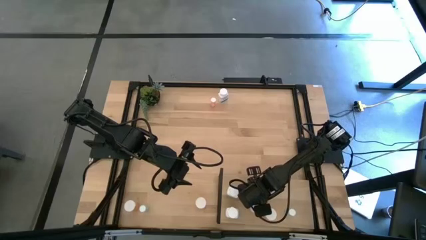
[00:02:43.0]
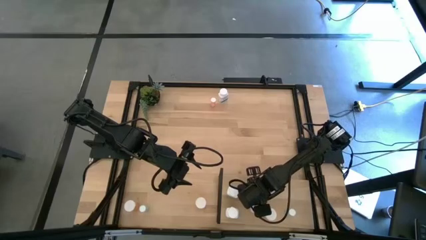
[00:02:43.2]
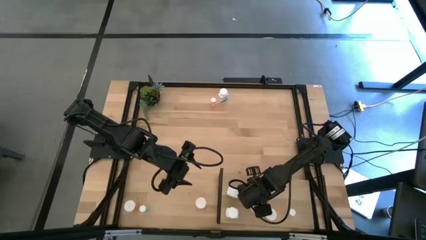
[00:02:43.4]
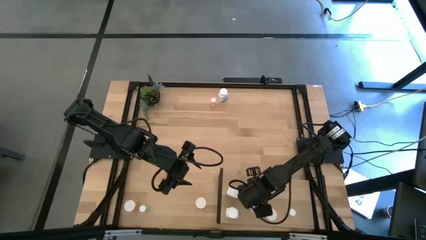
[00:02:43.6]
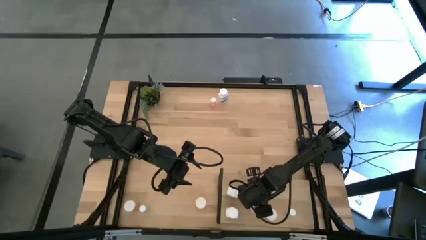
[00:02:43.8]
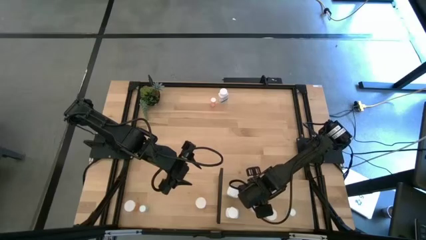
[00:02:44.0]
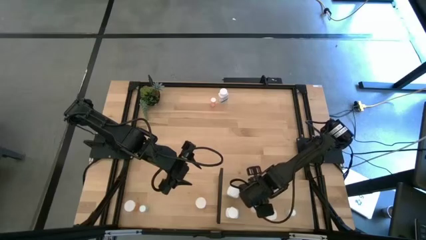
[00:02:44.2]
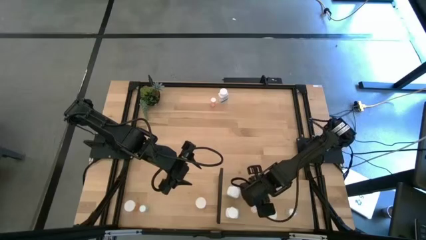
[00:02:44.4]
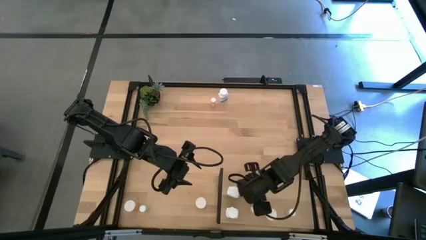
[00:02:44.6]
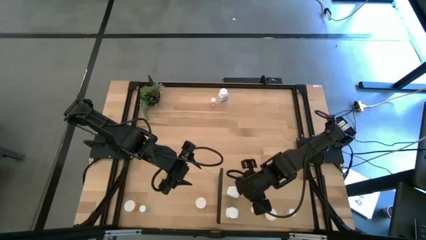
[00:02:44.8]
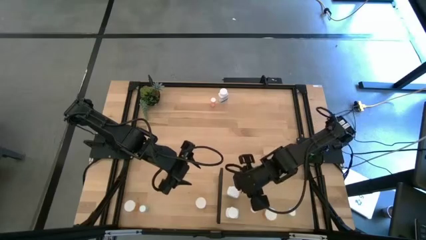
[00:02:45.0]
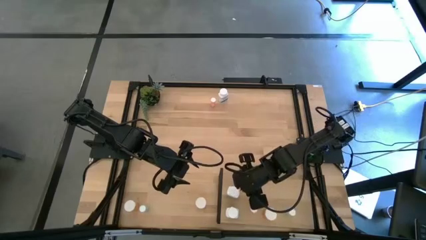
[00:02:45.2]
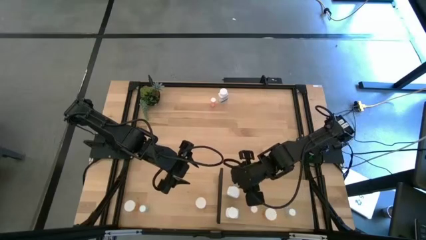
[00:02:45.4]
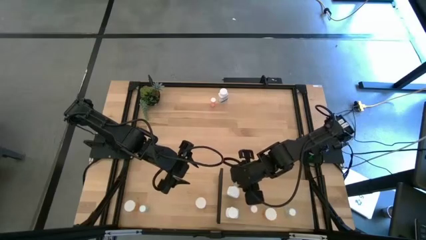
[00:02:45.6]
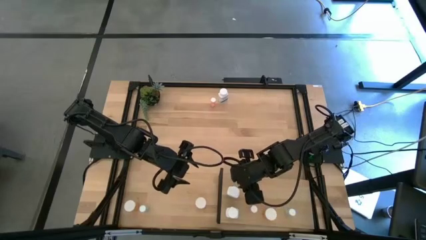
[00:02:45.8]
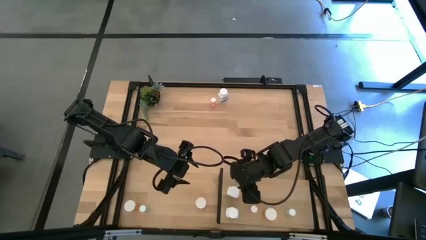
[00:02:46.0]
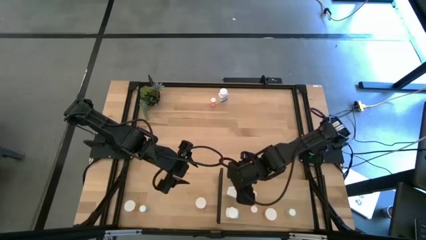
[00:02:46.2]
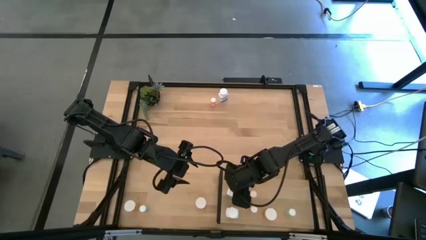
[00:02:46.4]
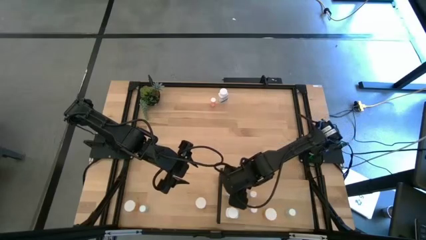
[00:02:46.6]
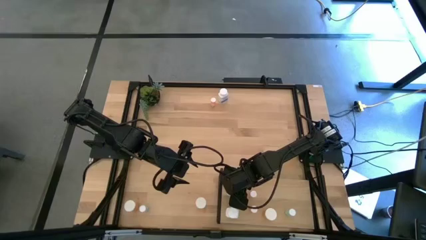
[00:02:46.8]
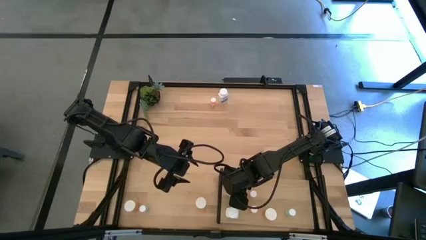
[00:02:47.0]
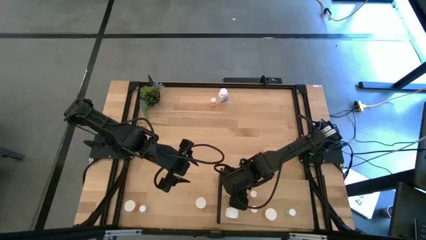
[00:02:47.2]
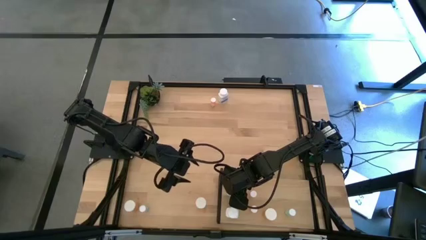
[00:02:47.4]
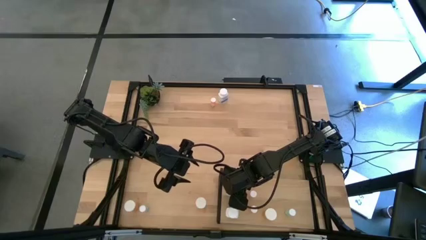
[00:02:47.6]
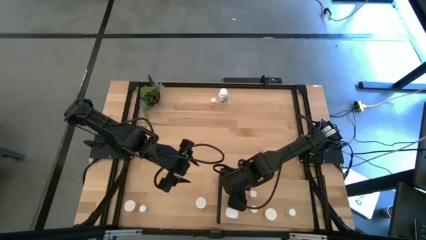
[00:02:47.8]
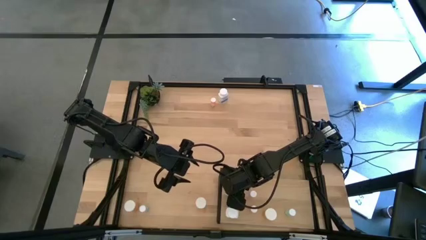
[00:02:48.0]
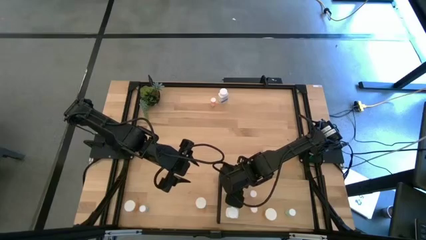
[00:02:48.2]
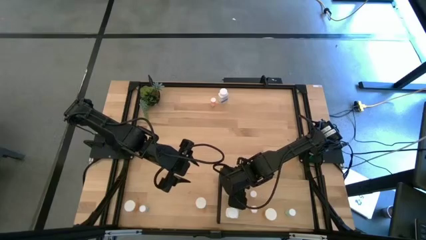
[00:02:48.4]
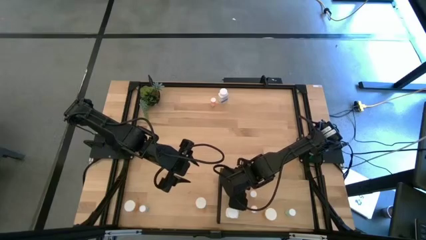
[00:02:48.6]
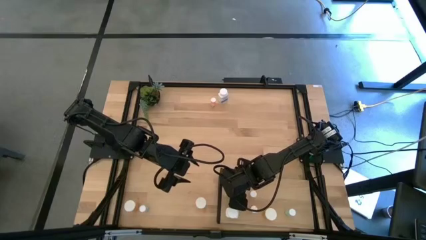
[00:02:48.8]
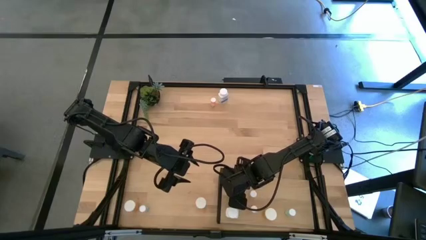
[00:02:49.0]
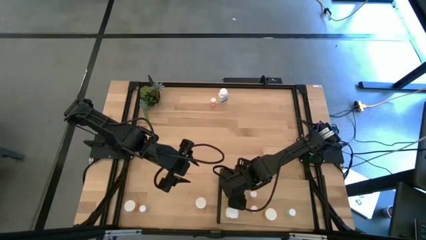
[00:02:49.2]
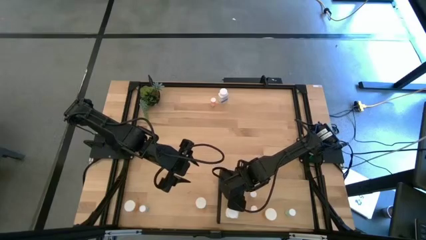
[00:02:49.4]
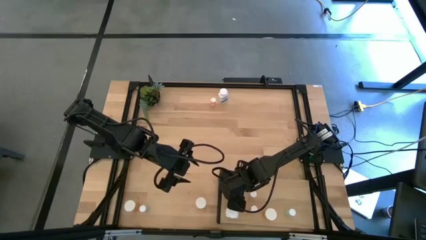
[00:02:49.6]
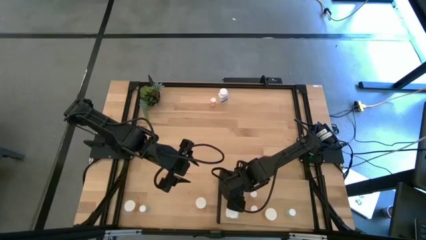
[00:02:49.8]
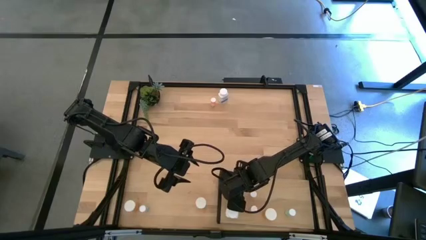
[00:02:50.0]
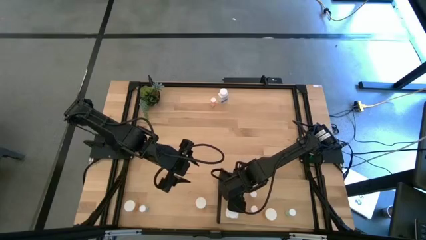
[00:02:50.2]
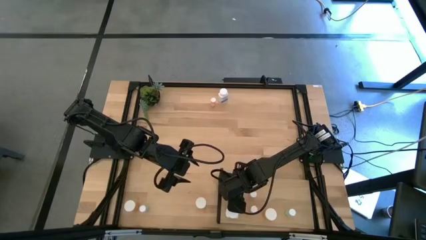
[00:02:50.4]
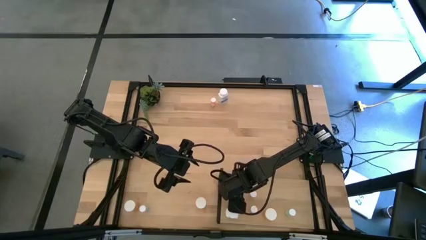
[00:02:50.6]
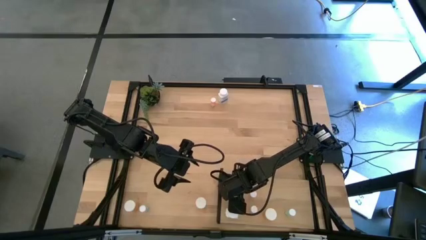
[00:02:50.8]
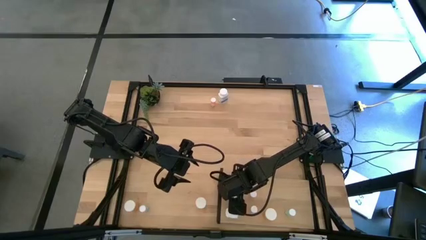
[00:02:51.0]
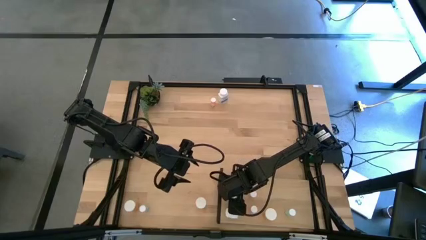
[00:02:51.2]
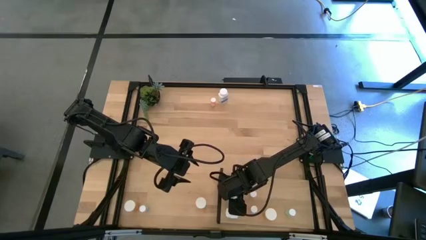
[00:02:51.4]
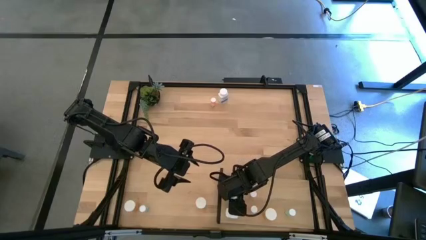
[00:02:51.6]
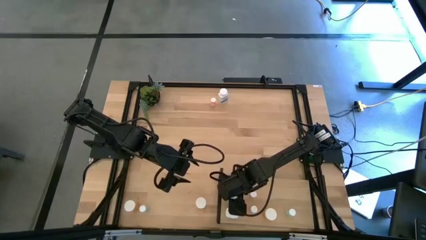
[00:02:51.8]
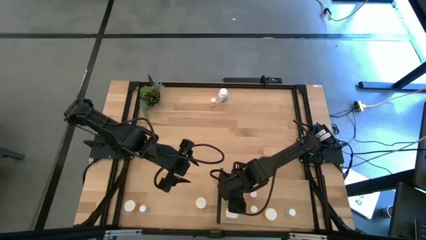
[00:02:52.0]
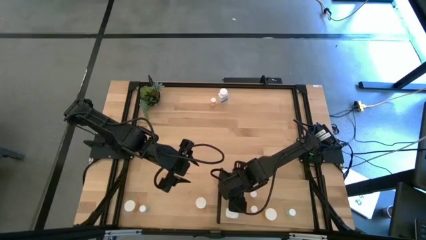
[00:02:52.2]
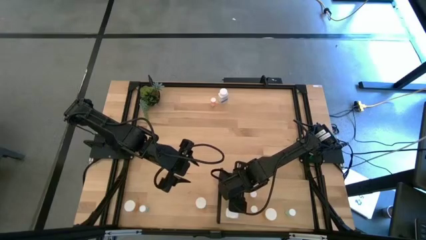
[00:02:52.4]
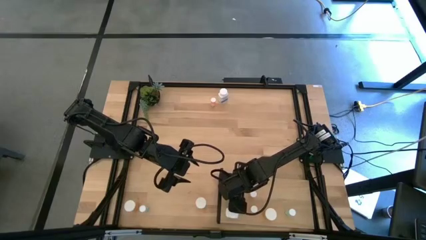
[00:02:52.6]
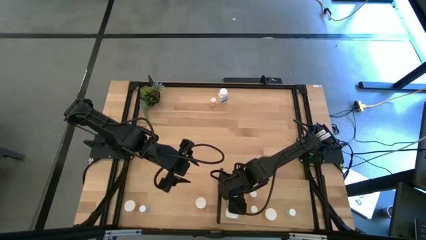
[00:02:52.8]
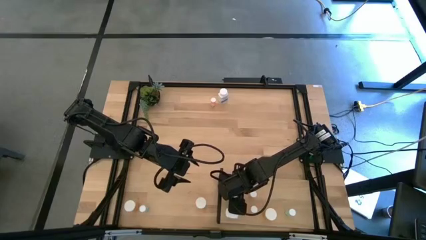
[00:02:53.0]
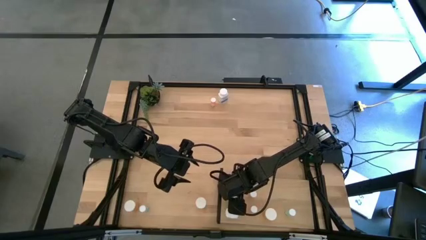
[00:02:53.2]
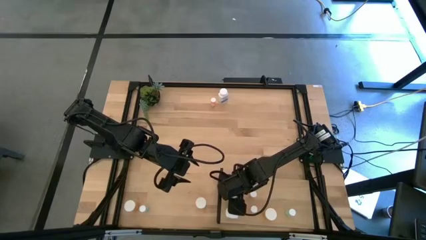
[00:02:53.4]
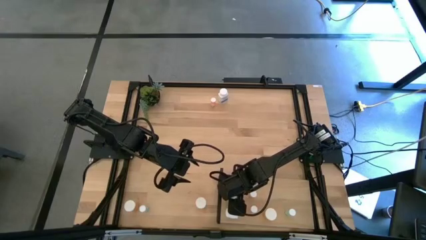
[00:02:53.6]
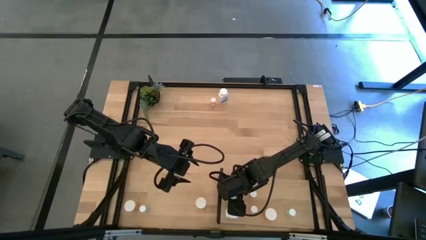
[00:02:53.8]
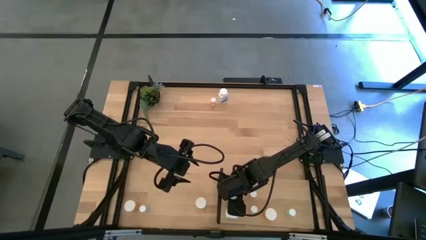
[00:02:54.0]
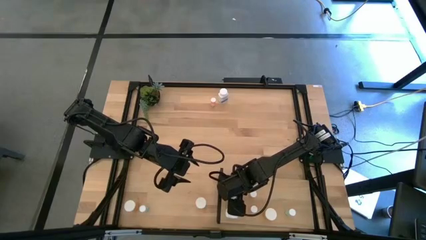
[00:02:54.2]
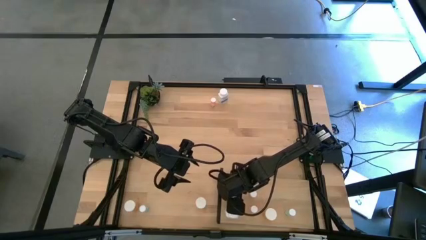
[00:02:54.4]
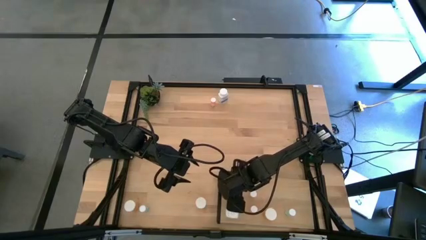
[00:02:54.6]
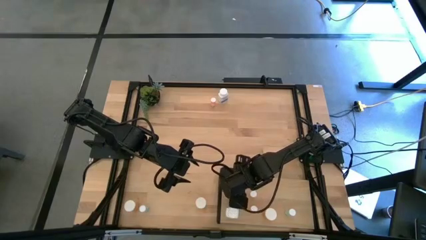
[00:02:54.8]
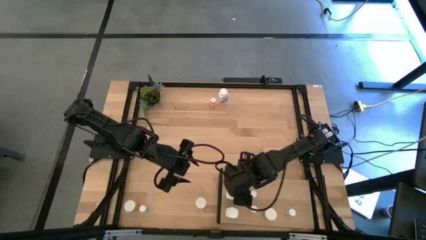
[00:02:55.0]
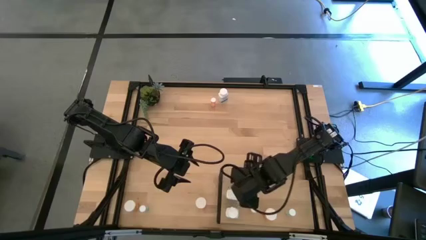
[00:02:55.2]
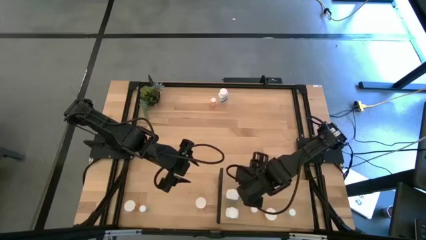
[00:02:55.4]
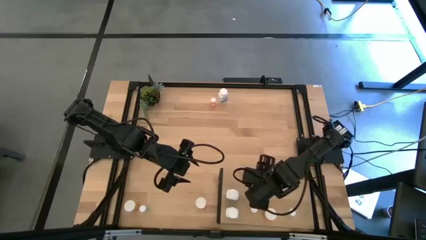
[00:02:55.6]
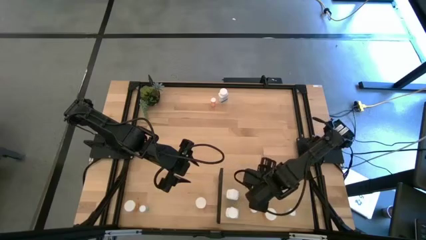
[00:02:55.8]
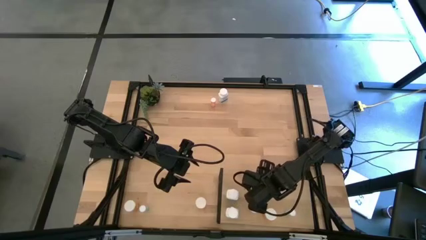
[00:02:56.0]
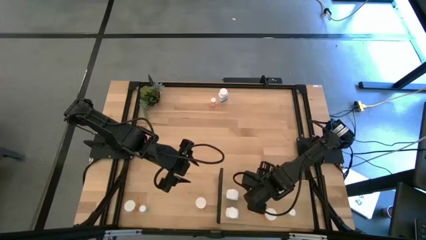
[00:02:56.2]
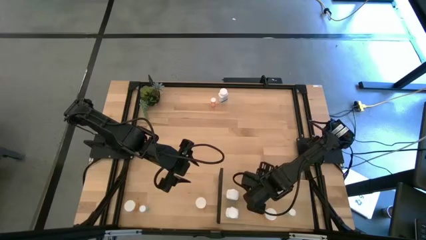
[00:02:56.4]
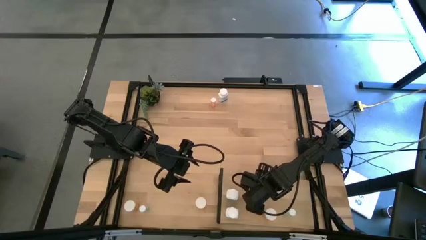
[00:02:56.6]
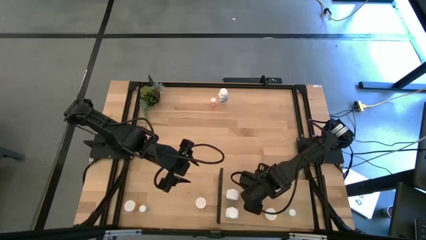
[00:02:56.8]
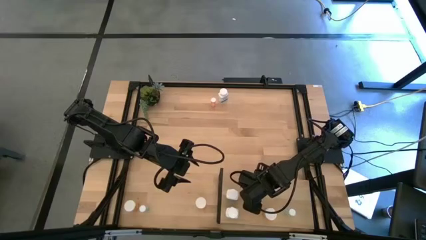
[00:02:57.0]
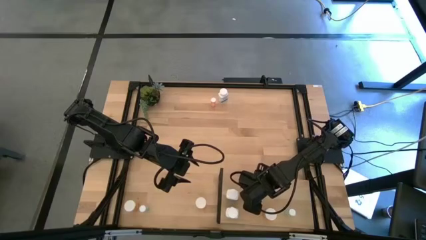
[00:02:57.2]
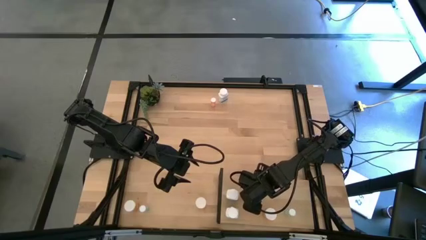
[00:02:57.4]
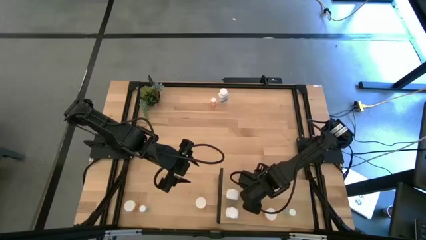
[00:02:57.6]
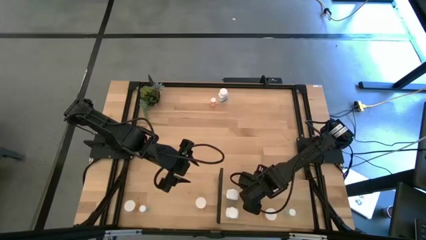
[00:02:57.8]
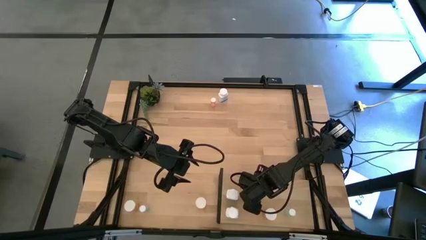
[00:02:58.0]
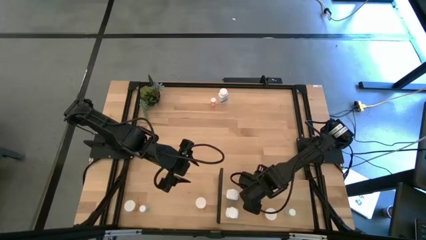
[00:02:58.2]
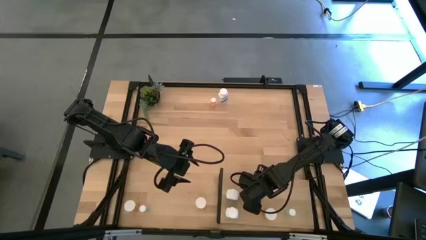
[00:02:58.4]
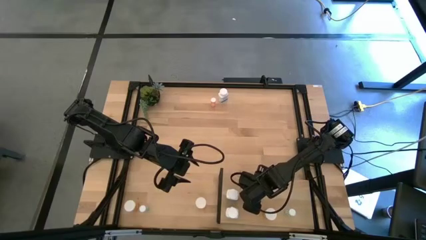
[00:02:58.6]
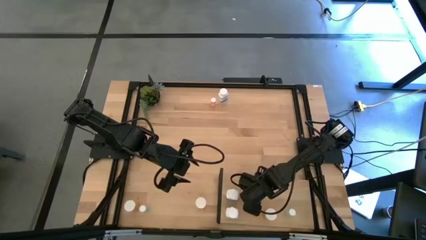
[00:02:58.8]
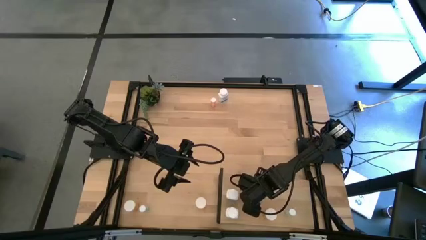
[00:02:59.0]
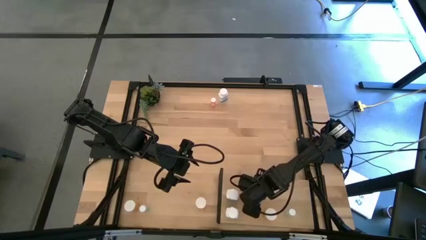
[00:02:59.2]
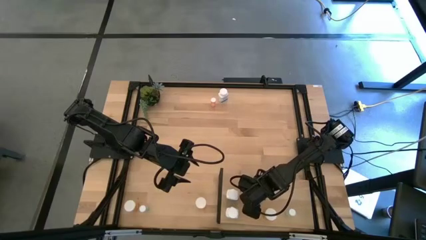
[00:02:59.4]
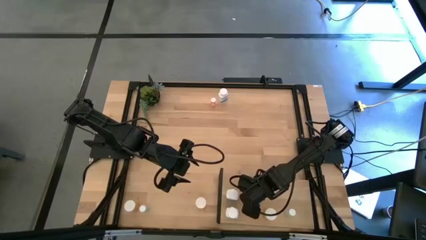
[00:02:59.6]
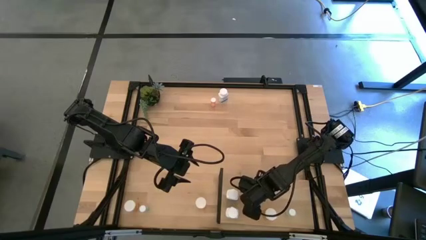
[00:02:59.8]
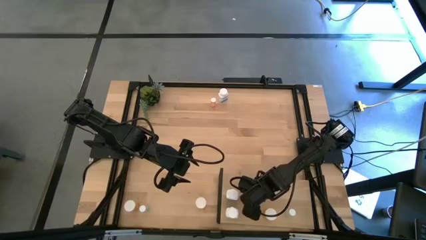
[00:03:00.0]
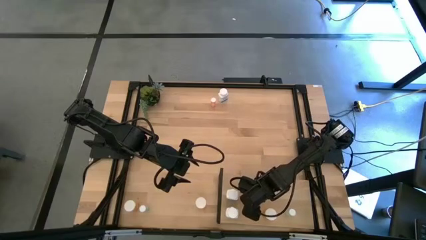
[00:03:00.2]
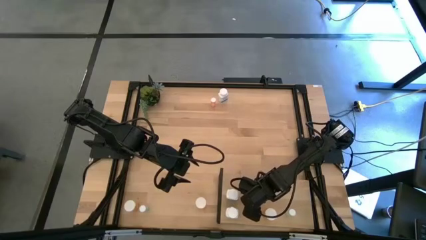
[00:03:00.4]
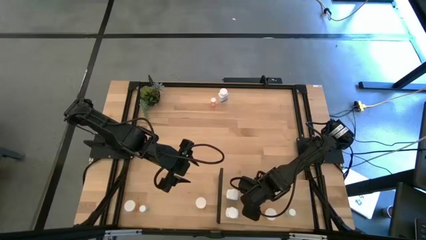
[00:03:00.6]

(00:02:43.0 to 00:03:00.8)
Task: Pick and place medicine bottles onto shelf by color
Put the top right pink pill bottle on the shelf
